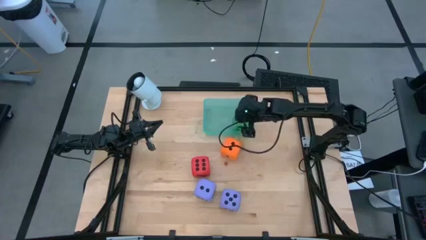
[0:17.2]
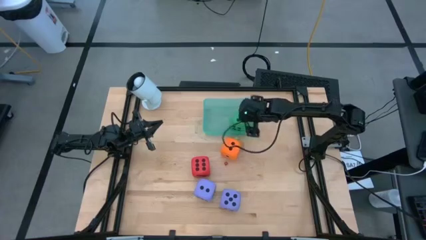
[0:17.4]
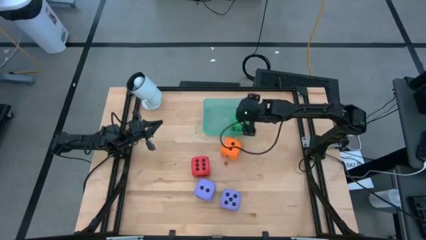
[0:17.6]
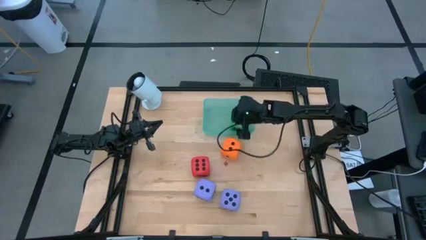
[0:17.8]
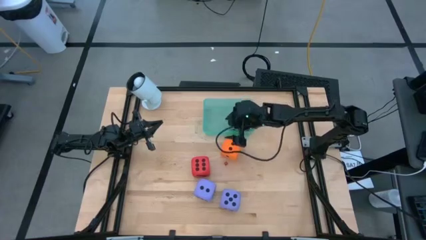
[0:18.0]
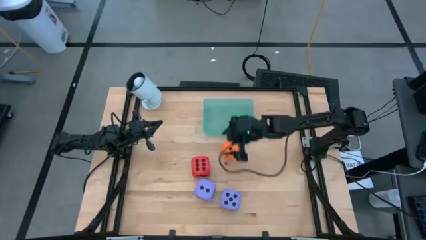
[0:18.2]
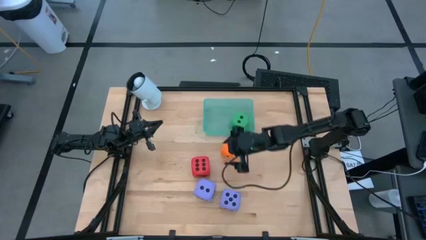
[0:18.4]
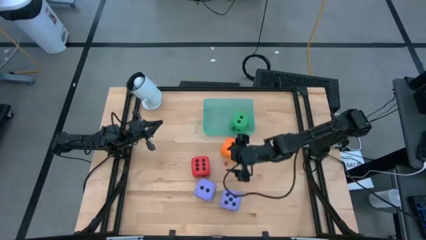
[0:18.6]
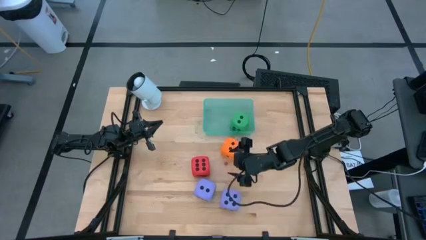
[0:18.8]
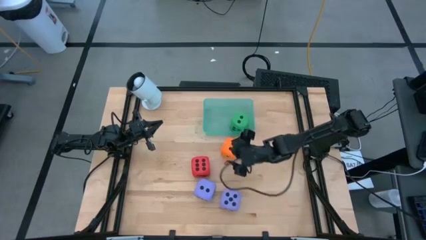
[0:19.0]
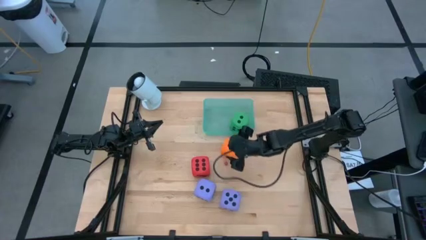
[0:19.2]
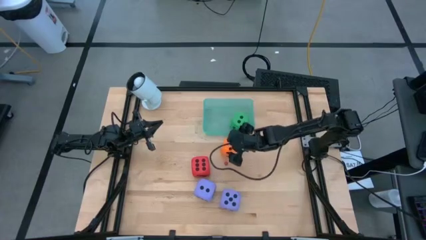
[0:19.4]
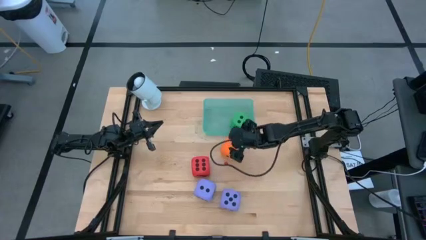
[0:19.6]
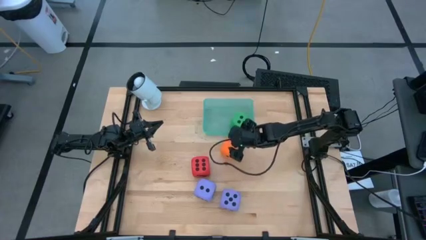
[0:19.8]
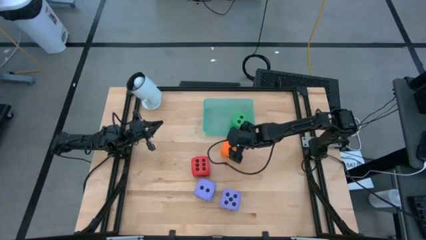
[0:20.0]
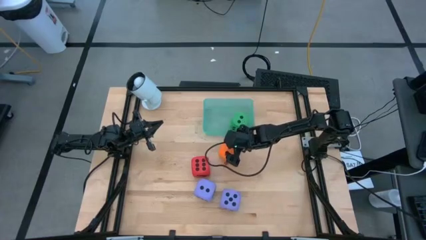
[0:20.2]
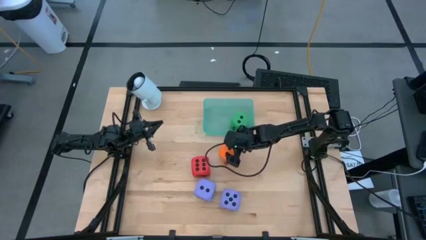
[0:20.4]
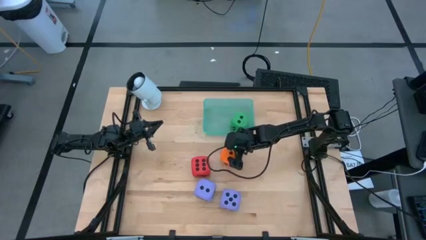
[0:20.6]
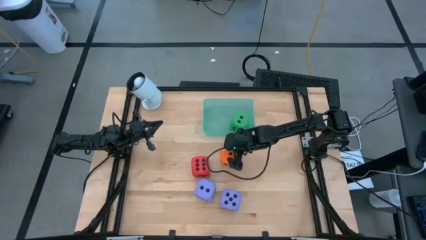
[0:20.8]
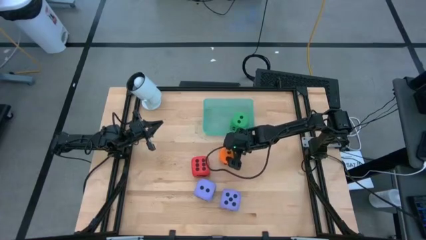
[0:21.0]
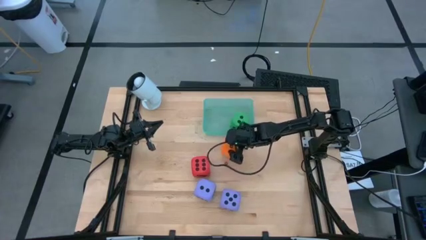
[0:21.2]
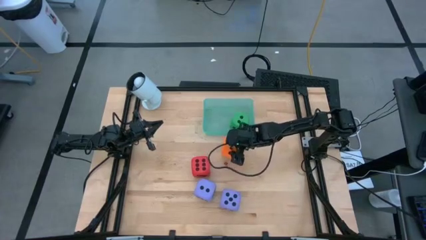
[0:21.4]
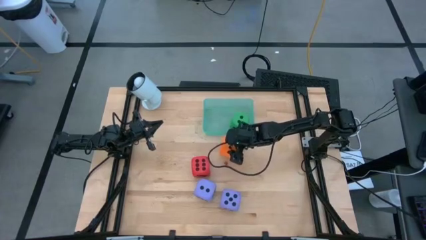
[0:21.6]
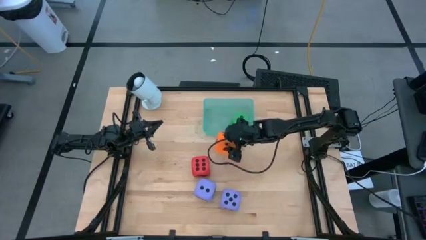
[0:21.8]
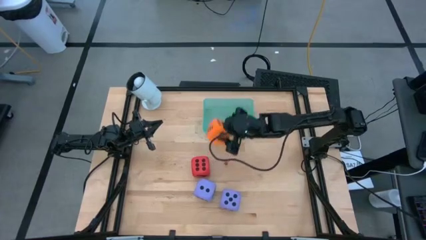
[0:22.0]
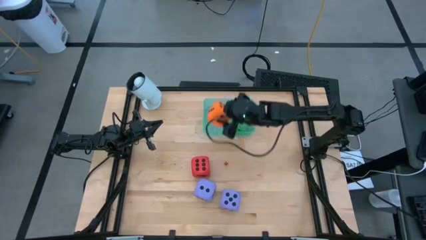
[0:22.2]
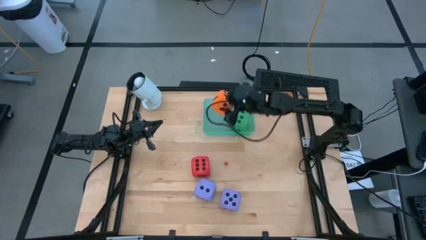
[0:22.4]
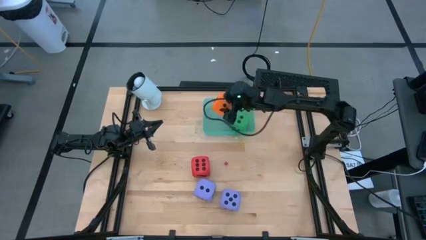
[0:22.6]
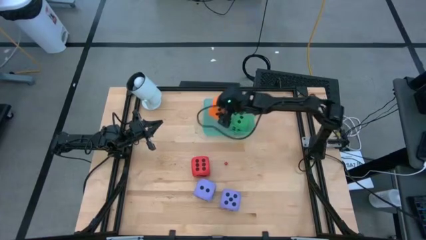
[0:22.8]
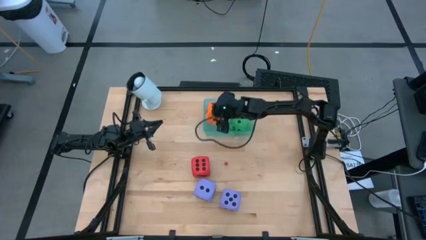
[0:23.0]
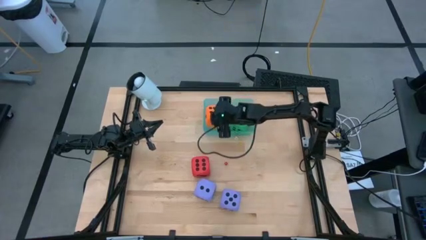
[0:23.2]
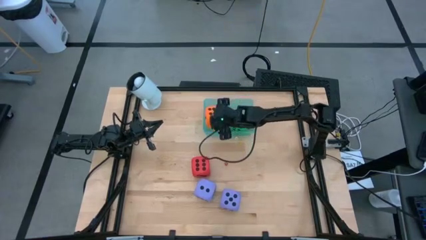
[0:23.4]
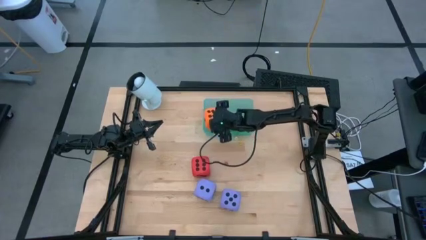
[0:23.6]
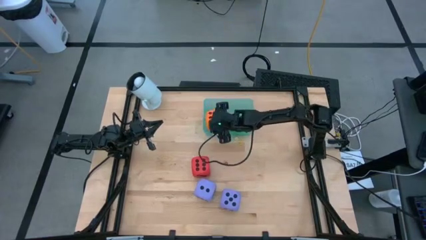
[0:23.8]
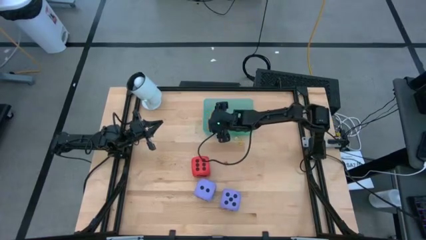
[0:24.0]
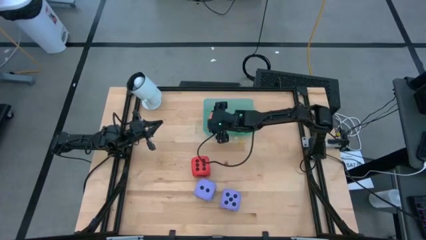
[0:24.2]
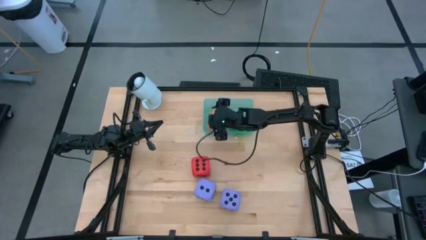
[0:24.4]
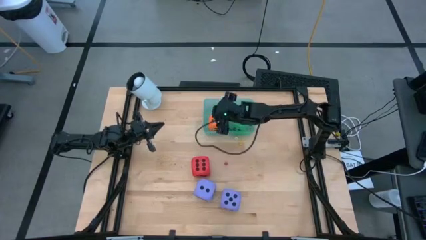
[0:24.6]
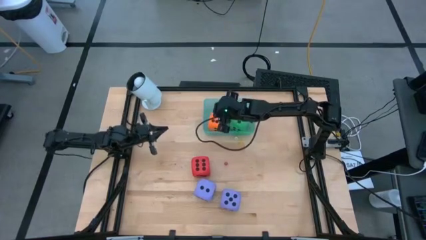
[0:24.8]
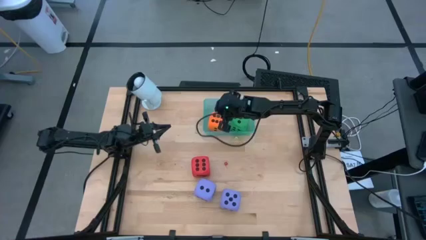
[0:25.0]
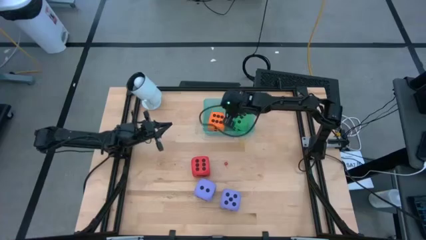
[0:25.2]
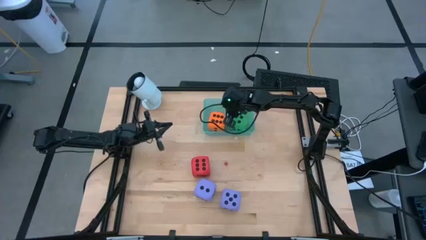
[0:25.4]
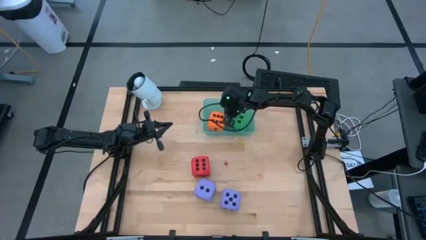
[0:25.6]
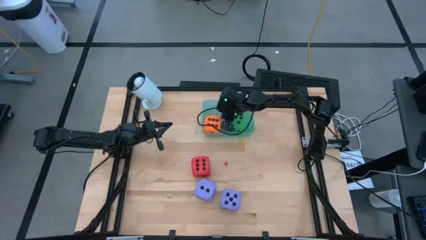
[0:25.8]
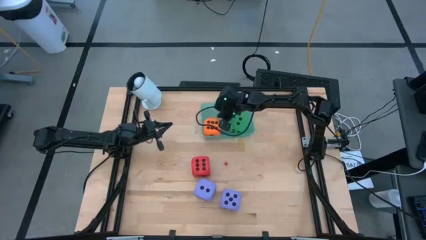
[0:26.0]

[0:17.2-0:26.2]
Task: Pick & Place Dice
Put the big orange die into the green bin

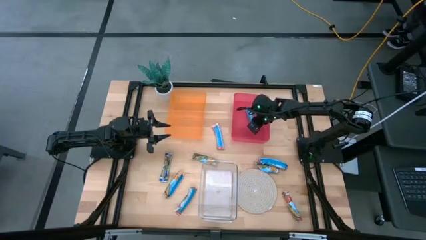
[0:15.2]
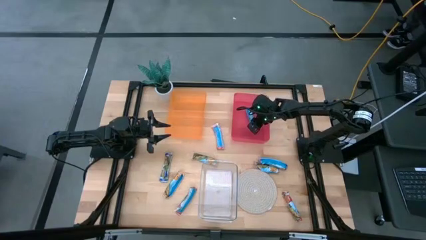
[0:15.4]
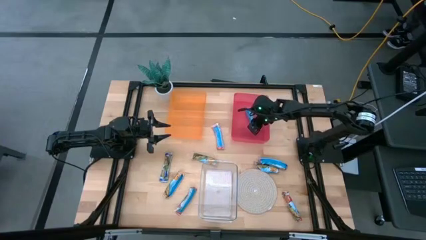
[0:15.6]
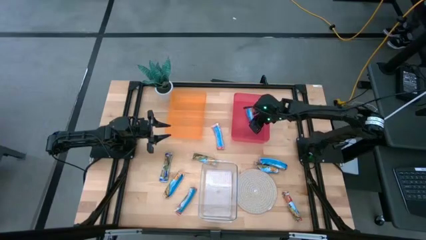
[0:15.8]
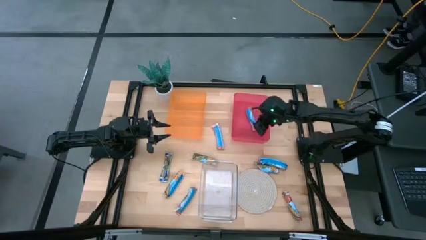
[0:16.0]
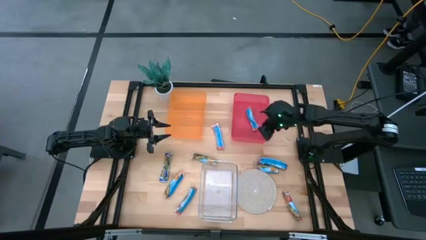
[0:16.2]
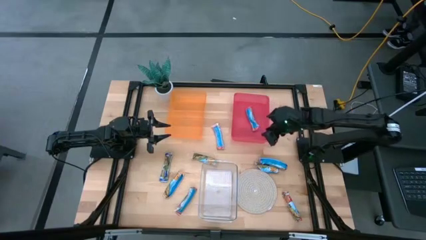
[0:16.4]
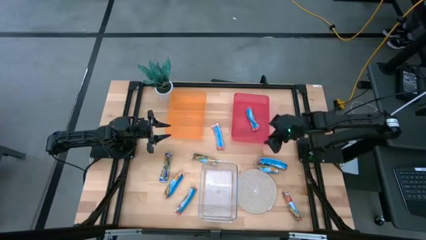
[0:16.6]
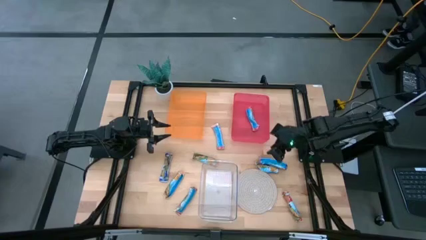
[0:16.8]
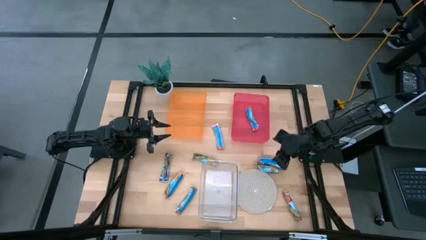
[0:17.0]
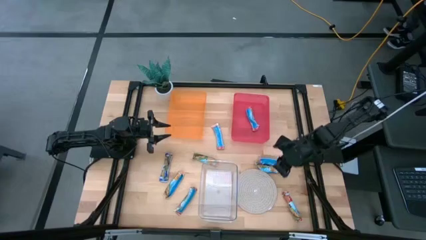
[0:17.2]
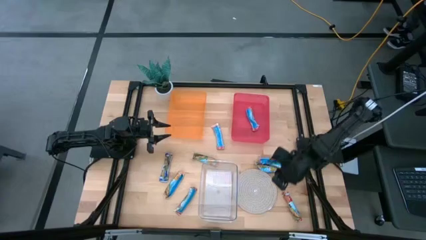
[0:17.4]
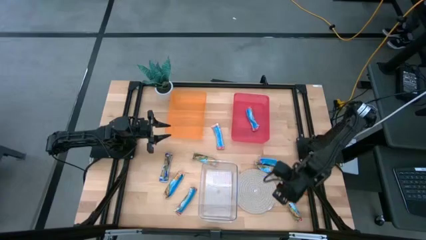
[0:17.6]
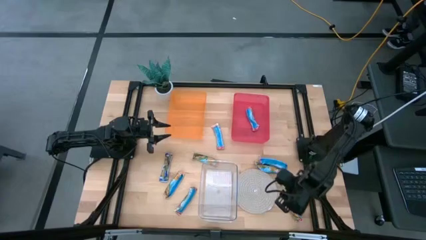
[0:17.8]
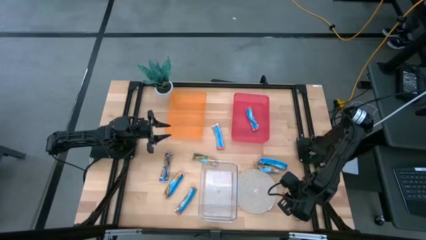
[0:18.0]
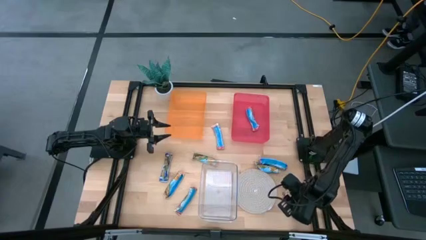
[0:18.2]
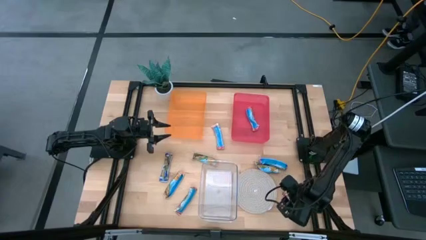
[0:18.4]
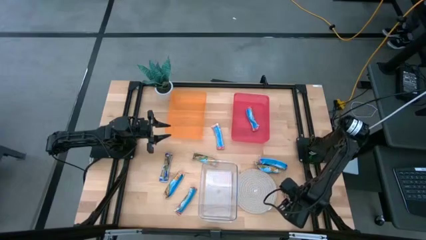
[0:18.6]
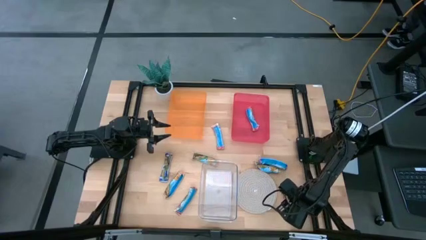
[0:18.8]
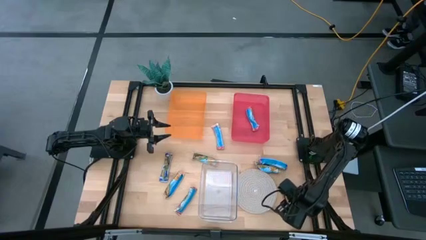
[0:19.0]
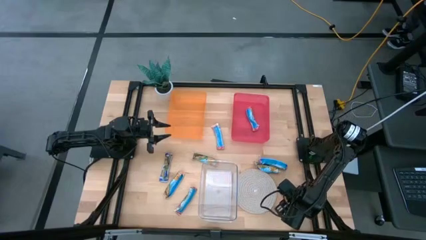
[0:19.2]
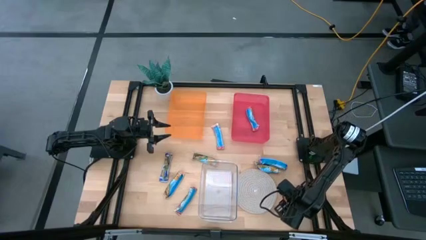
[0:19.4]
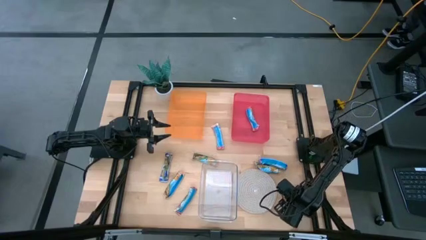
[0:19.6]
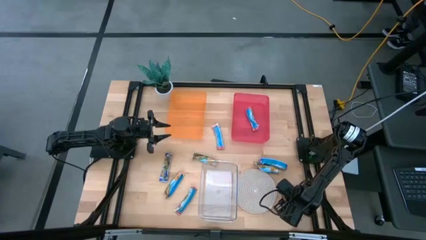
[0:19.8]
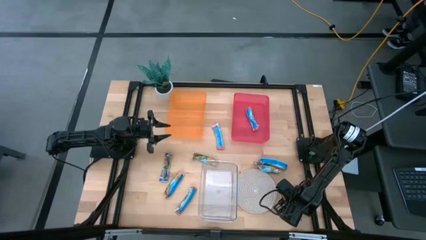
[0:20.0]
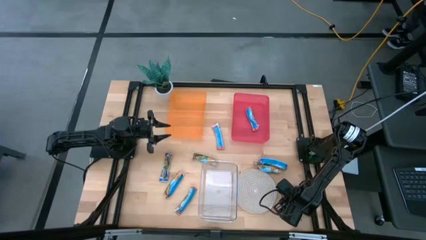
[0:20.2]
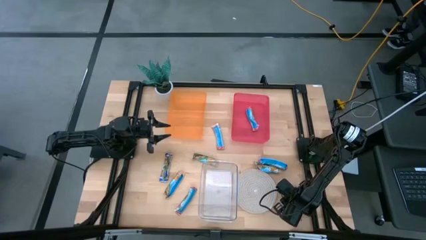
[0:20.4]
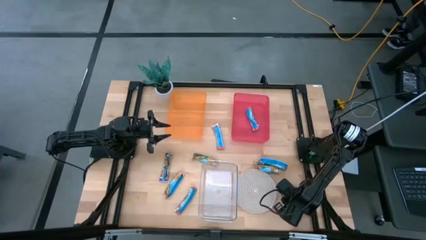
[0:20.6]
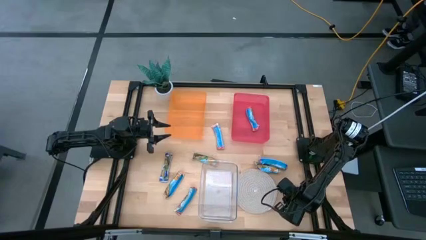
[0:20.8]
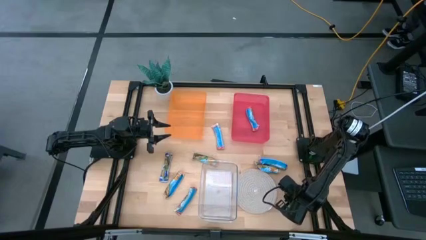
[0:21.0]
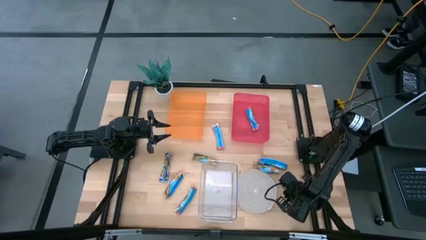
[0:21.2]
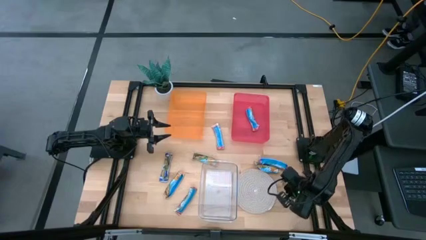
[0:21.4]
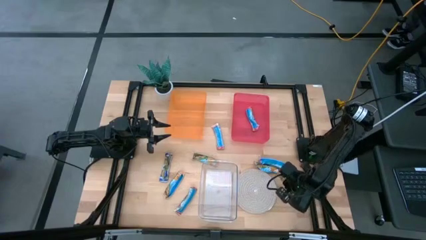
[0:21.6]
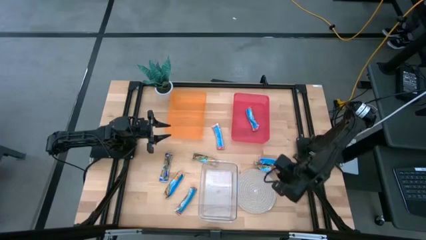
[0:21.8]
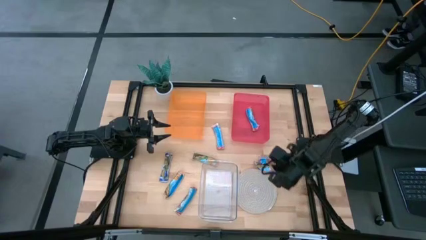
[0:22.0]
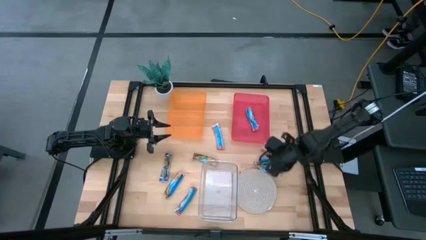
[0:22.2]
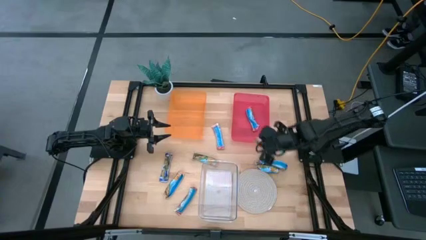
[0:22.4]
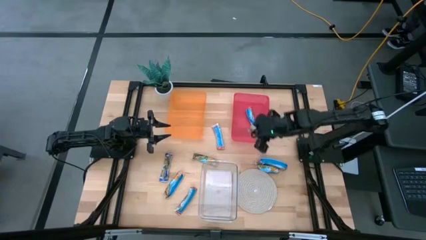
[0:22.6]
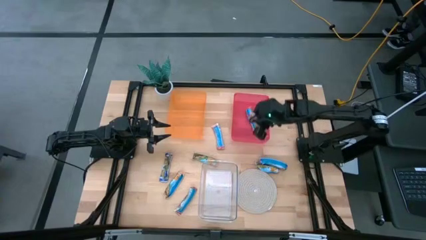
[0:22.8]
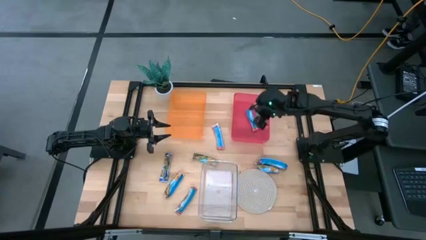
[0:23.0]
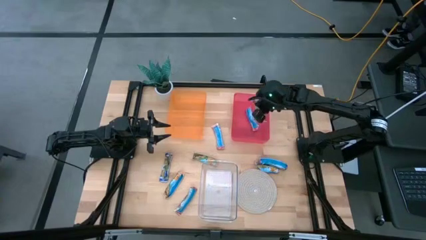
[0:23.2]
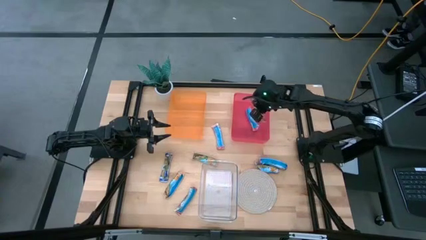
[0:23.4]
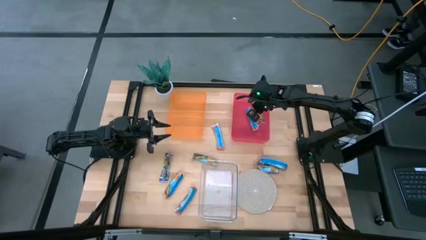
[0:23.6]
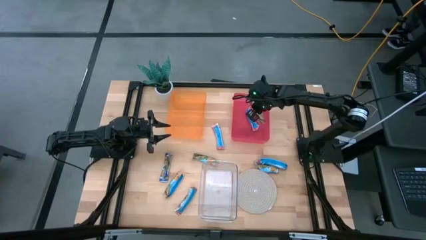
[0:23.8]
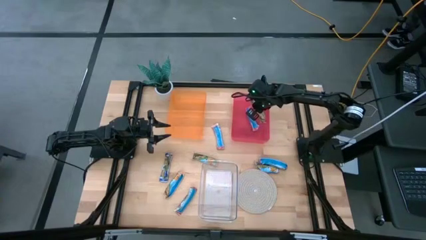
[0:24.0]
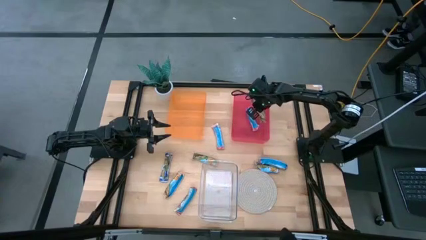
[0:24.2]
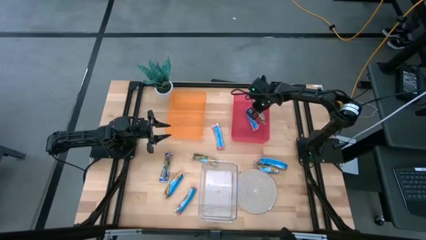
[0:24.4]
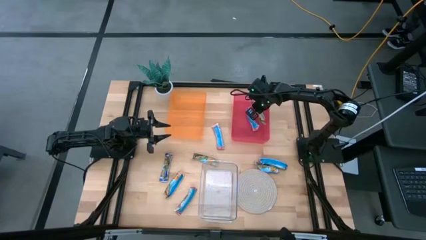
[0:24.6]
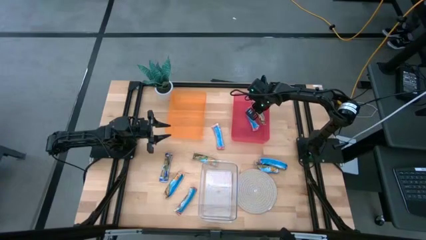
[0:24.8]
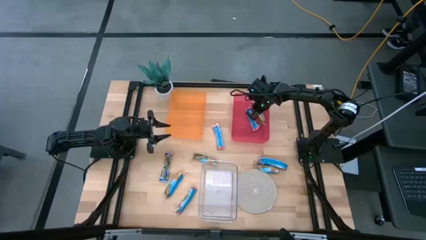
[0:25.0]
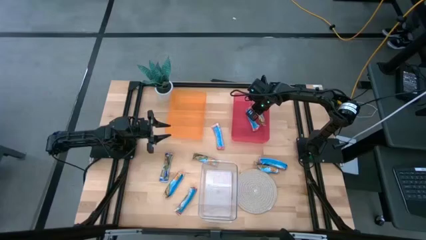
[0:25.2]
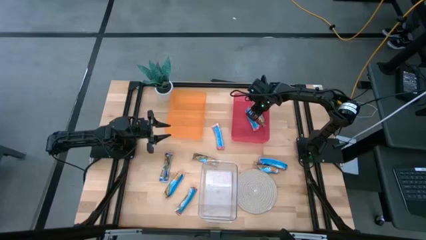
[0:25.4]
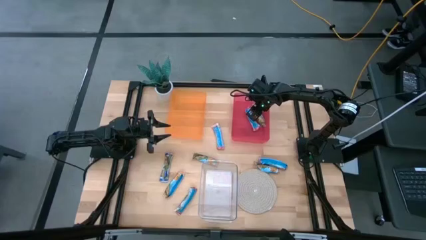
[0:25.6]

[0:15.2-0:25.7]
Task: Pick and place Granola Bars by type
Put the red granola bar into the red bin
